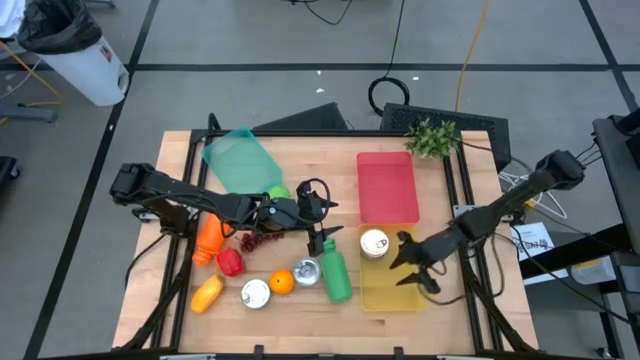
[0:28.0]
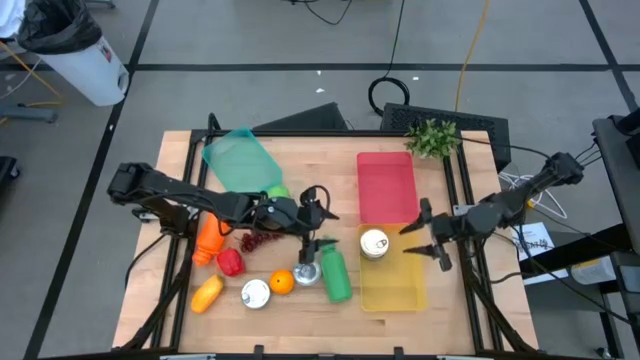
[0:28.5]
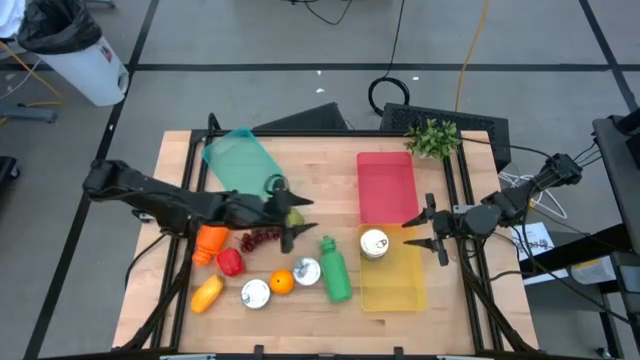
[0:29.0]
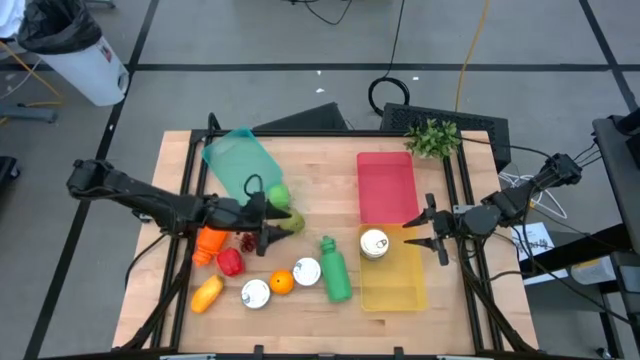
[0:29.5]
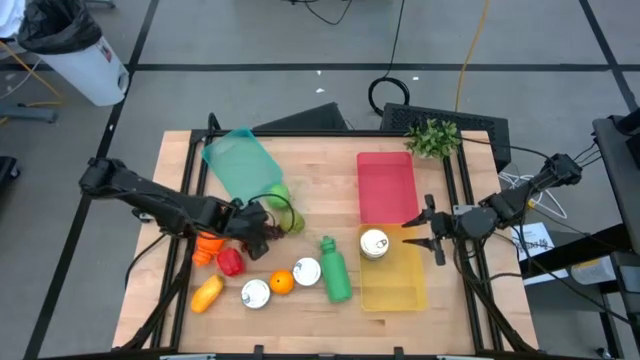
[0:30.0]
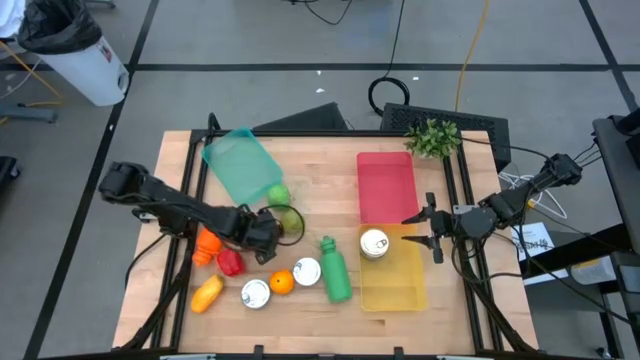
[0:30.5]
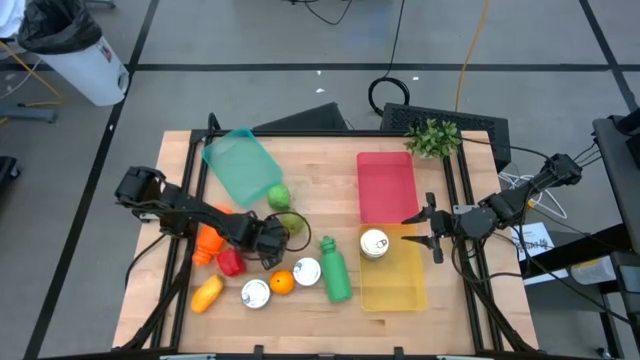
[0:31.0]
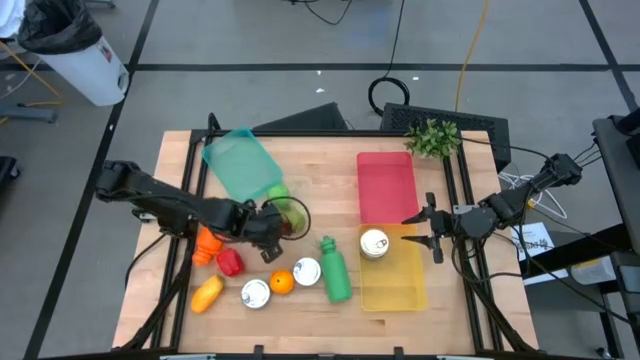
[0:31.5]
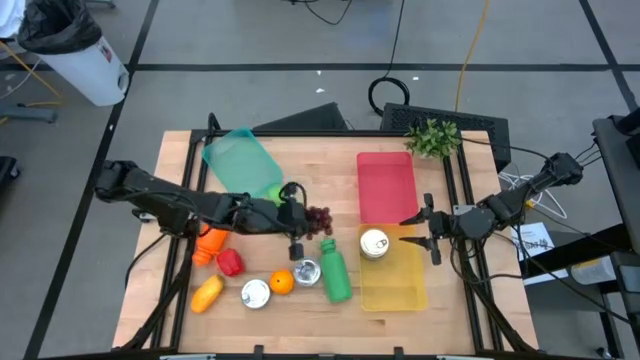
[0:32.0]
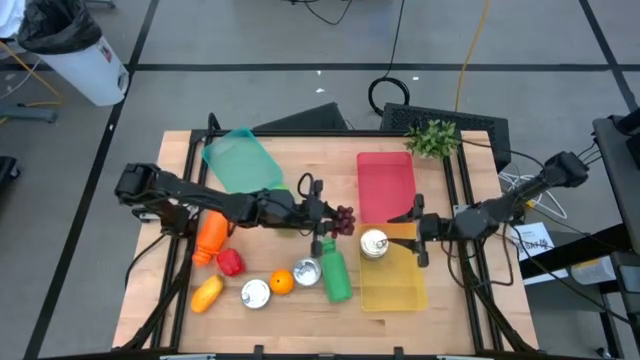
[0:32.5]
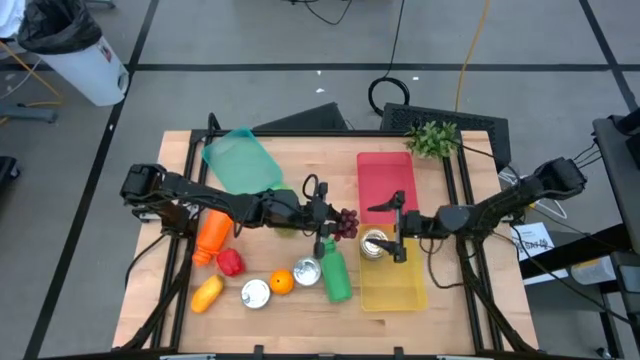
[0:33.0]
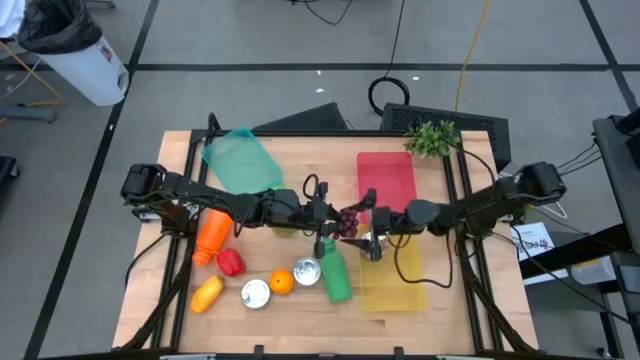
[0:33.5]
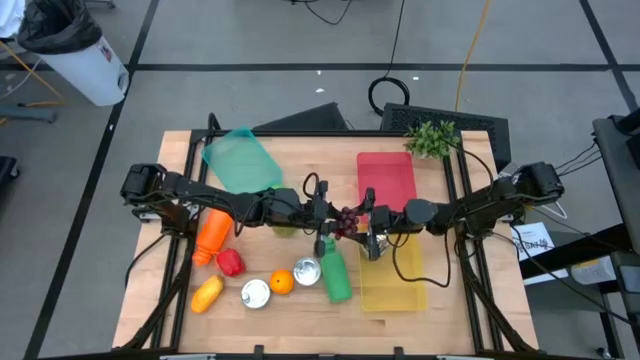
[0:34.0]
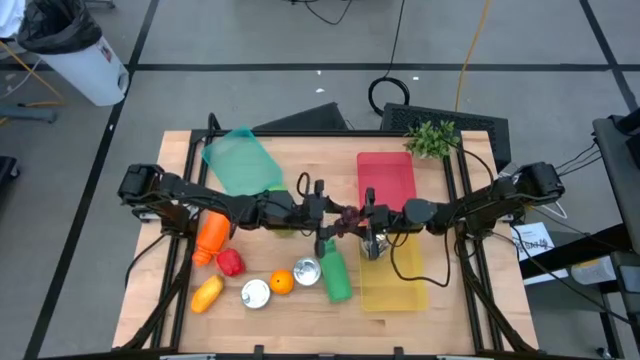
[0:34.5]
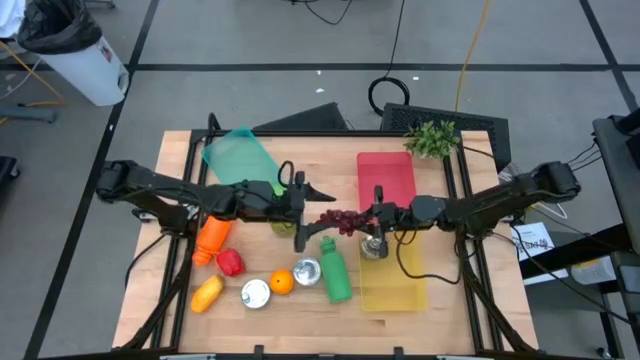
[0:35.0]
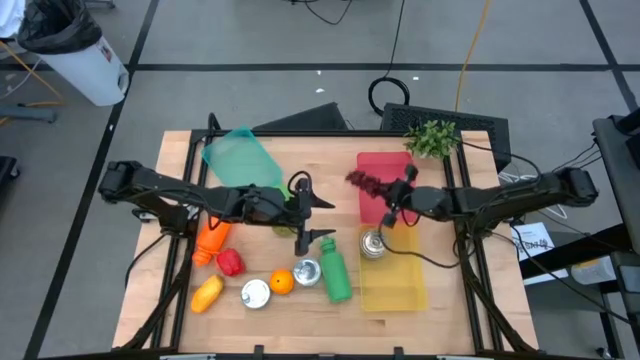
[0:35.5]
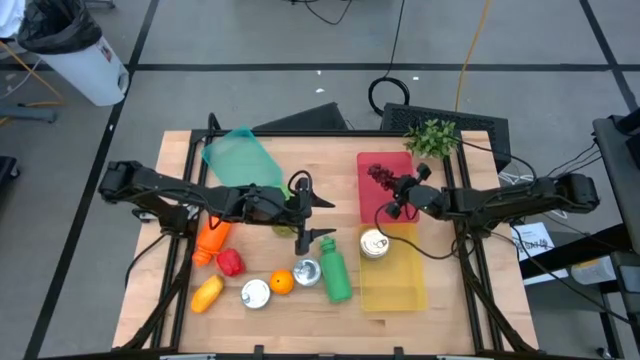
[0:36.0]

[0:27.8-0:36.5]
Task: Pick & Place Food Item
Put the purple grapes into the pink bin

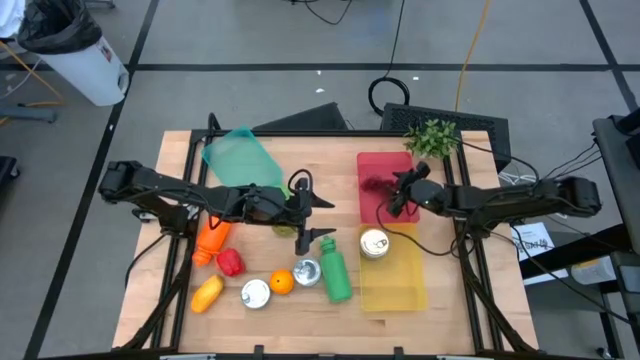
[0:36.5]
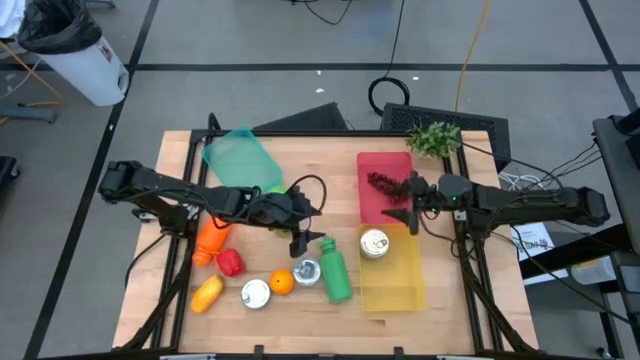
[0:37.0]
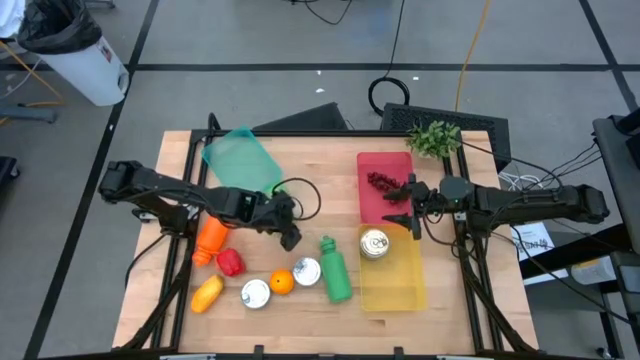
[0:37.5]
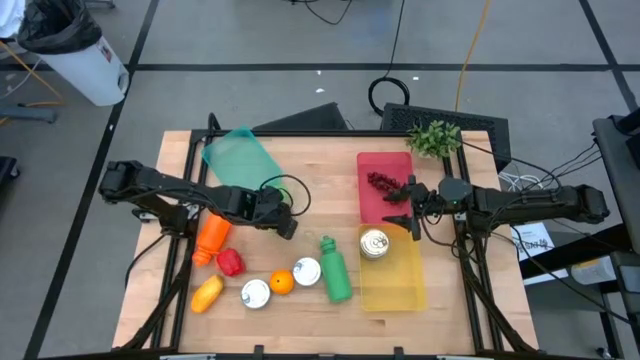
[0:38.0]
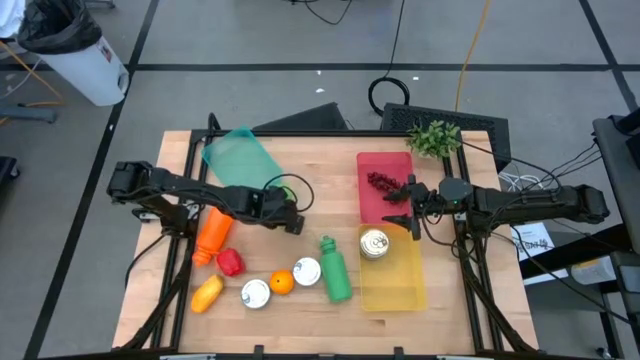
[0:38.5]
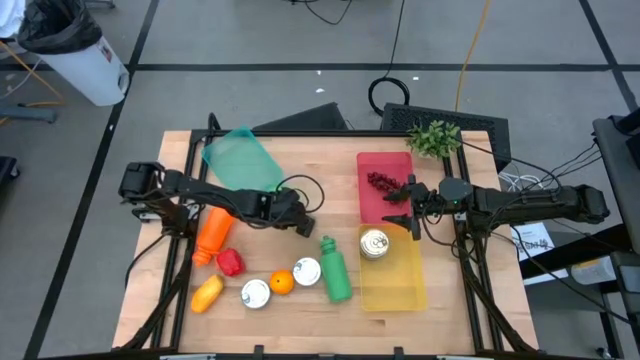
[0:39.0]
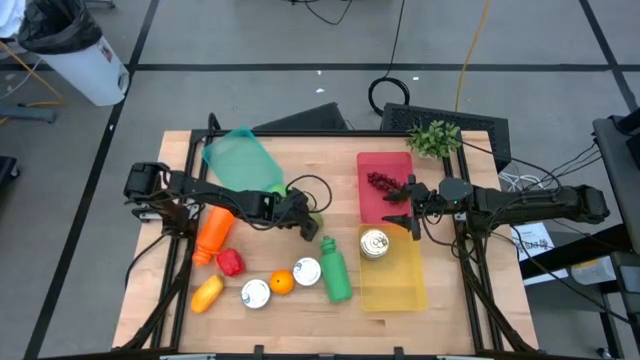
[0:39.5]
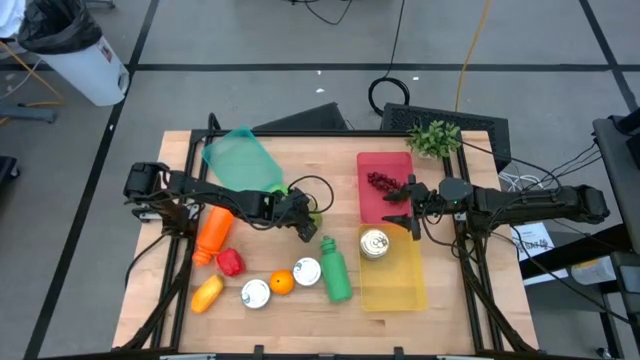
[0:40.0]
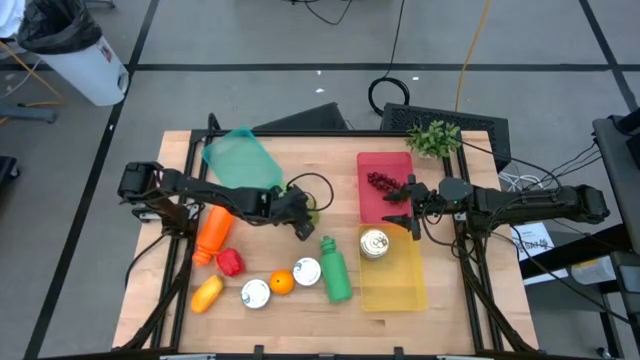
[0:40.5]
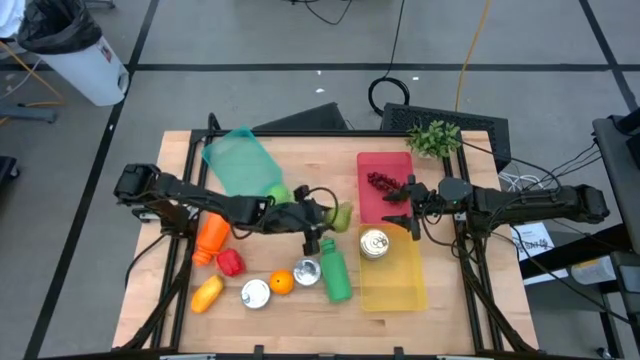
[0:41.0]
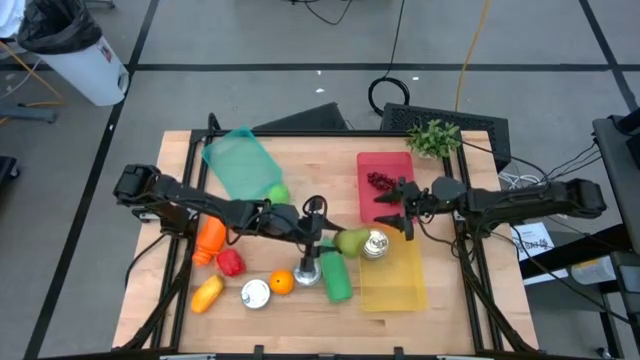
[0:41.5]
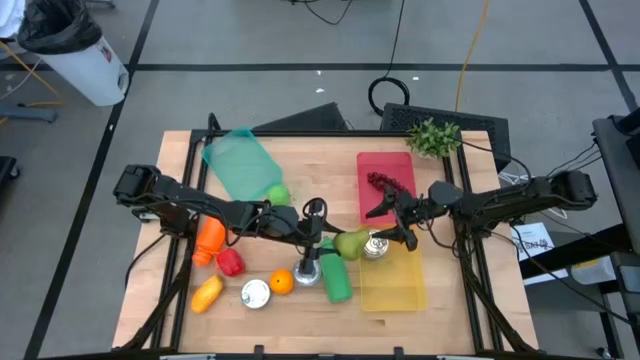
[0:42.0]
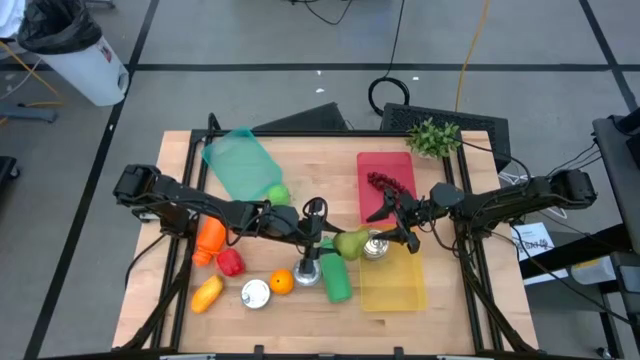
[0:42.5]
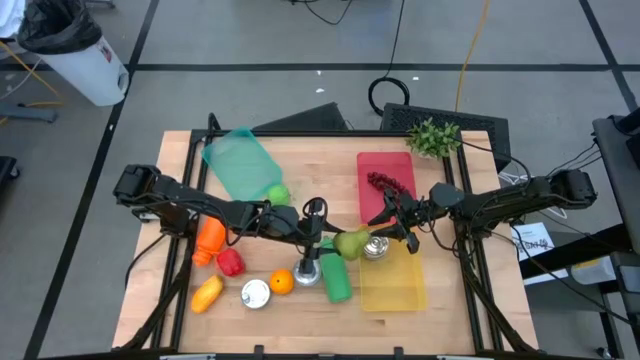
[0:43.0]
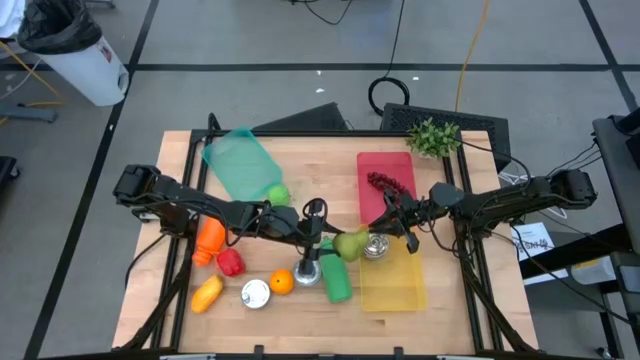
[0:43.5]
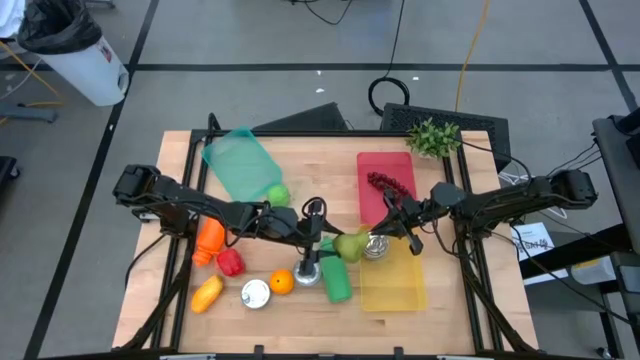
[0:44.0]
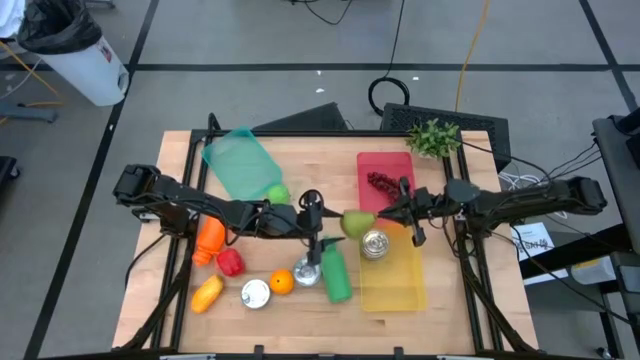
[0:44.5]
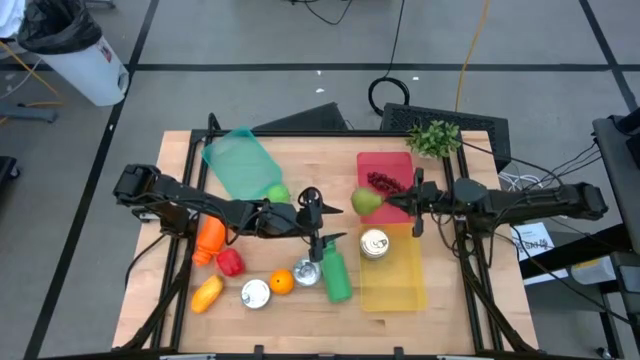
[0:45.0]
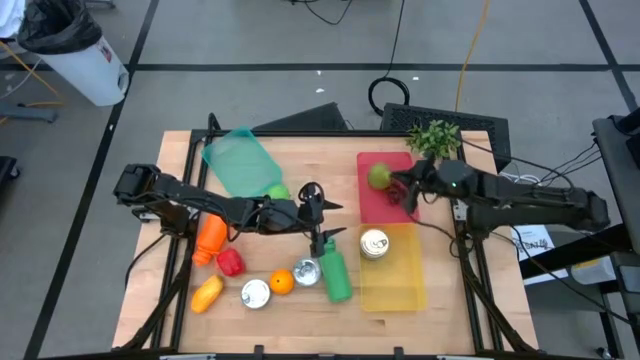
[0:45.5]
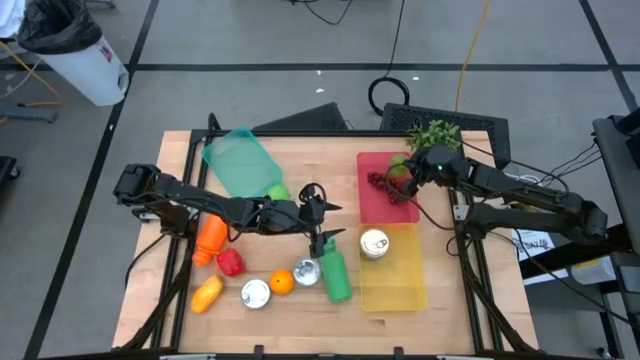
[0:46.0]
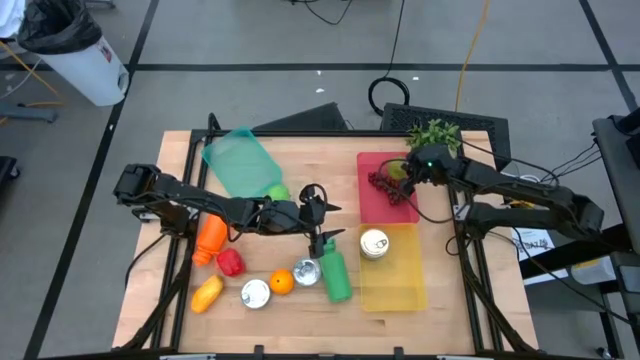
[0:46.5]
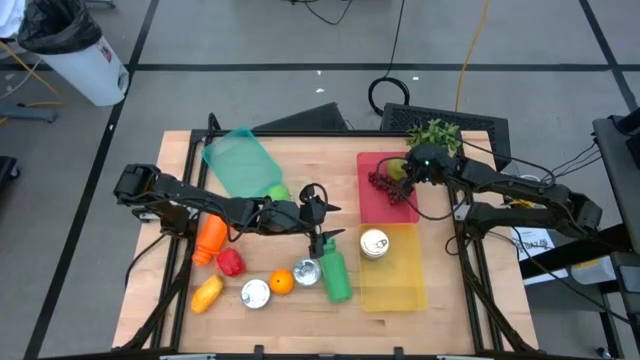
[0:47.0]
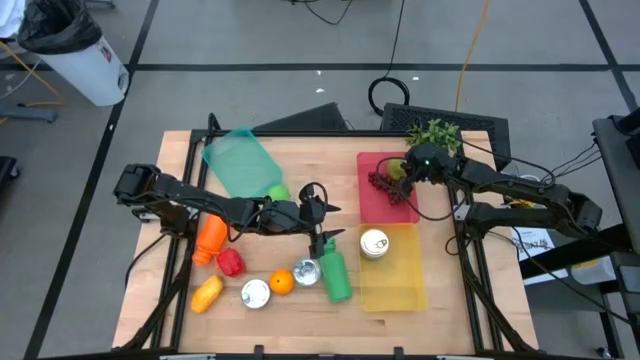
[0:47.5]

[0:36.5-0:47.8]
Put the green pear into the pink bin

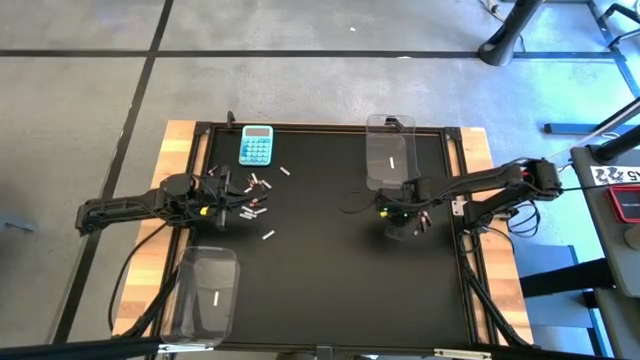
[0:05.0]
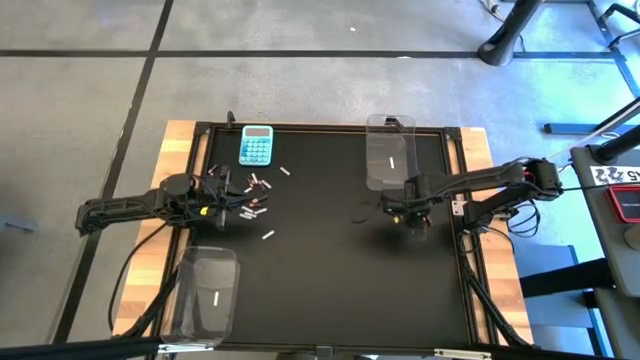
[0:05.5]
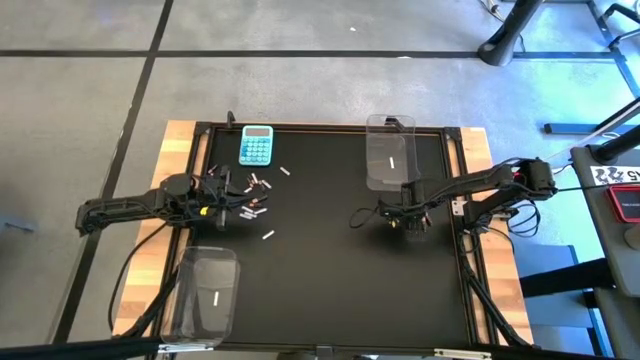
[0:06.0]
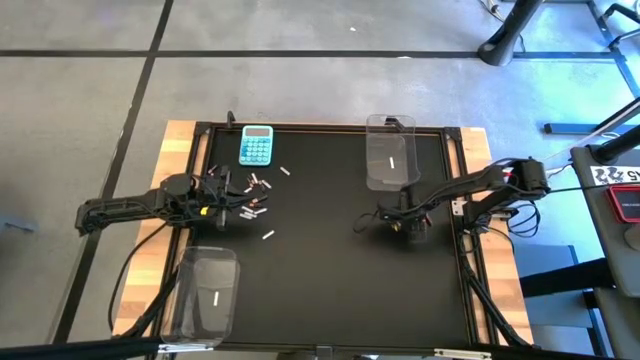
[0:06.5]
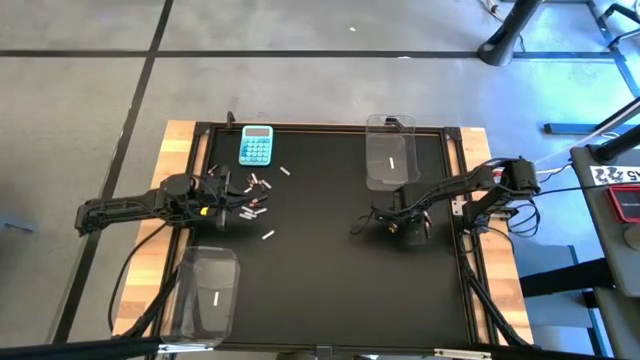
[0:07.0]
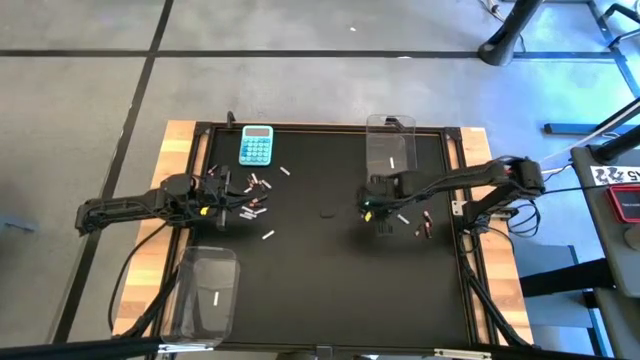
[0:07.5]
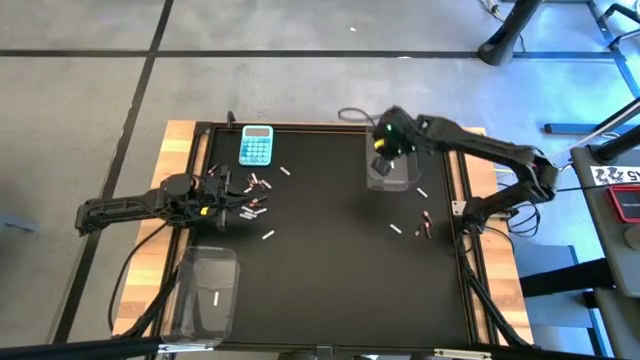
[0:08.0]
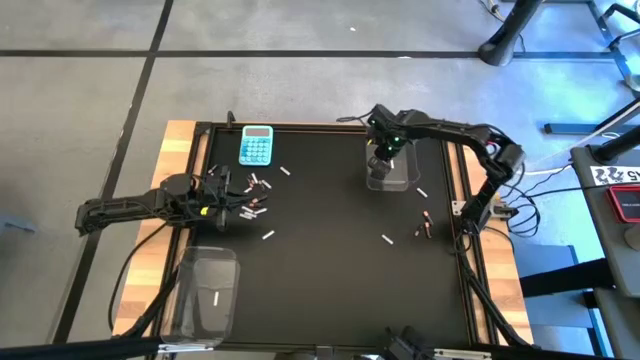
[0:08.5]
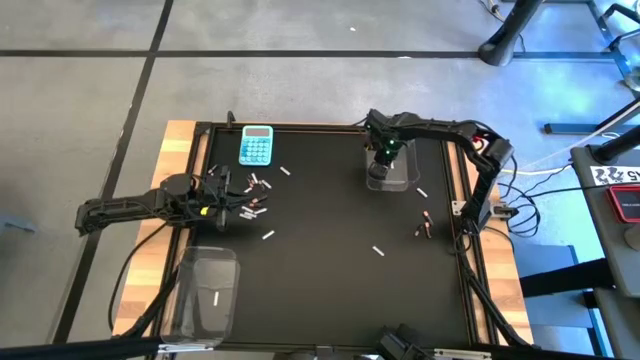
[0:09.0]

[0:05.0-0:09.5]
Task: Sort batteries
Put the white battery into the top transparent bin
